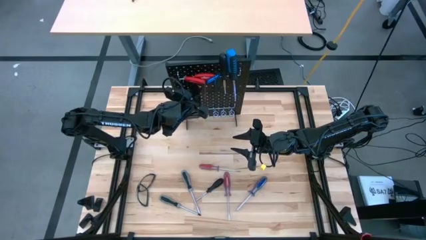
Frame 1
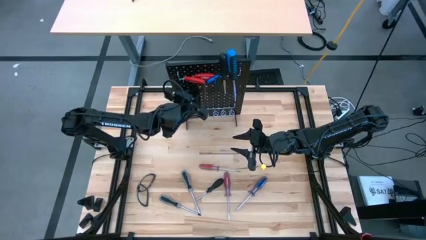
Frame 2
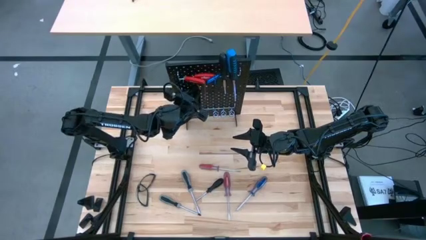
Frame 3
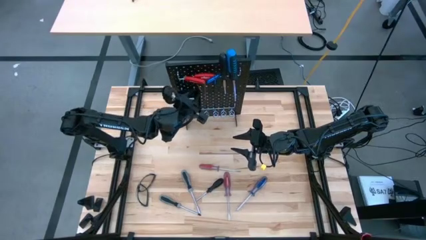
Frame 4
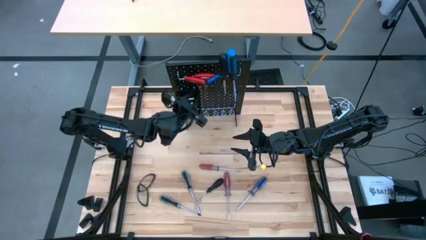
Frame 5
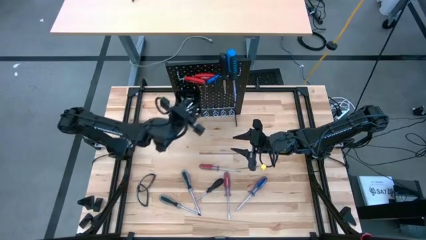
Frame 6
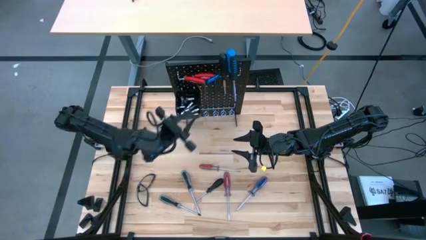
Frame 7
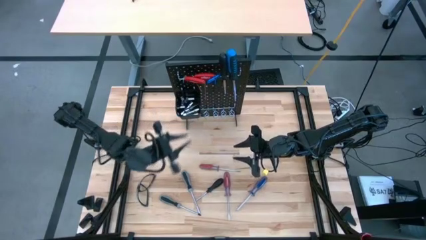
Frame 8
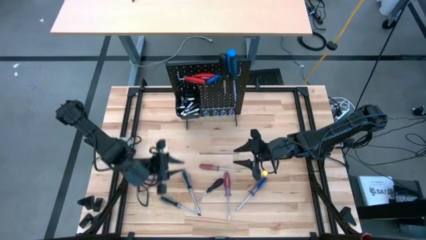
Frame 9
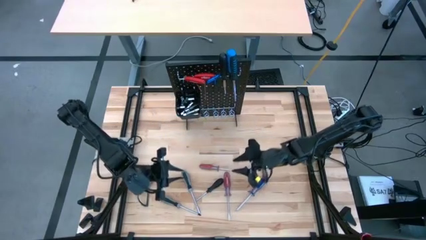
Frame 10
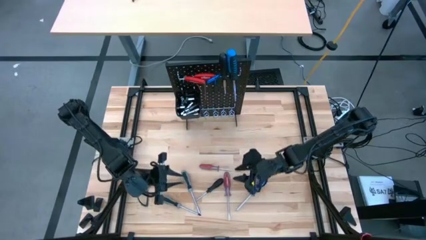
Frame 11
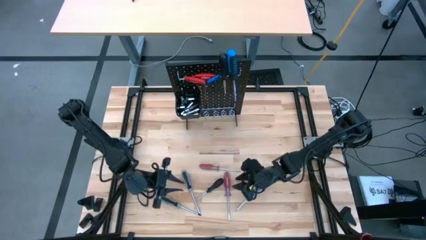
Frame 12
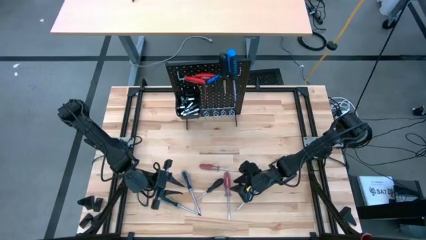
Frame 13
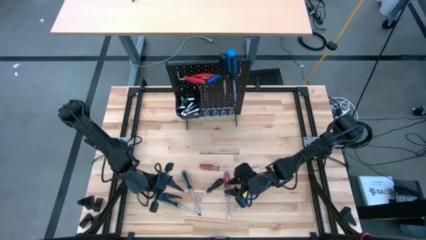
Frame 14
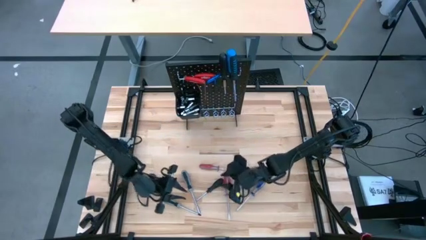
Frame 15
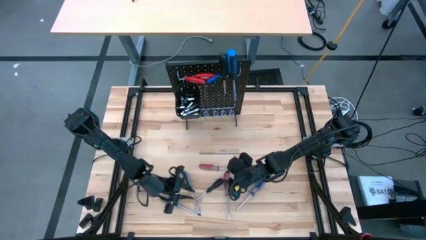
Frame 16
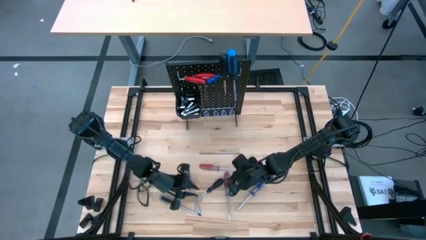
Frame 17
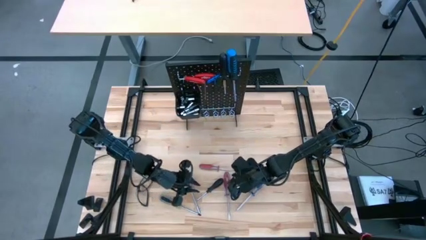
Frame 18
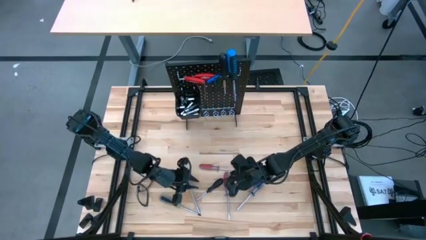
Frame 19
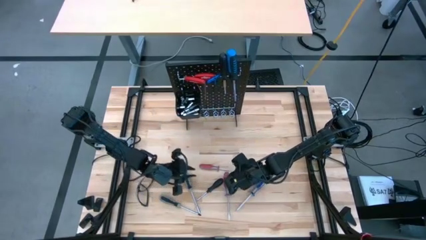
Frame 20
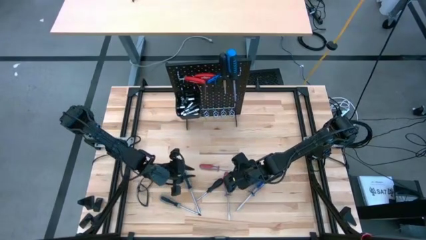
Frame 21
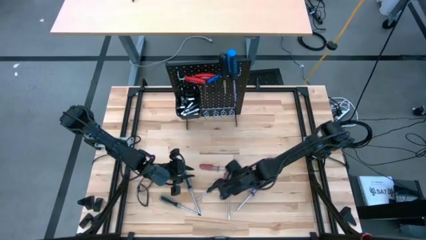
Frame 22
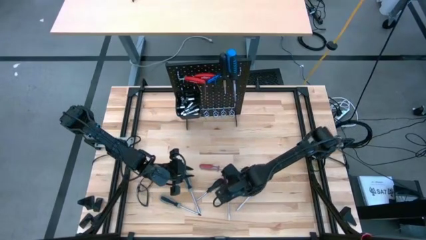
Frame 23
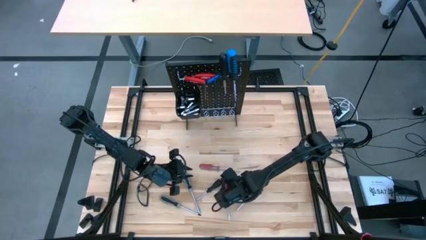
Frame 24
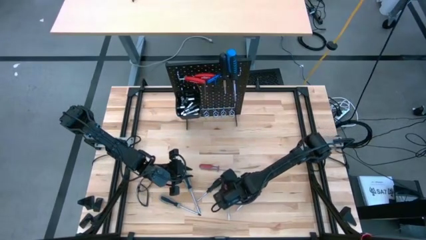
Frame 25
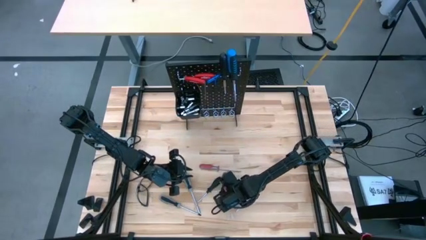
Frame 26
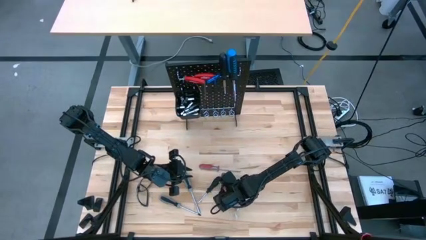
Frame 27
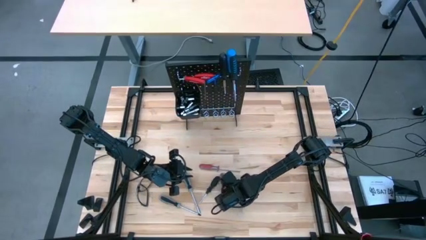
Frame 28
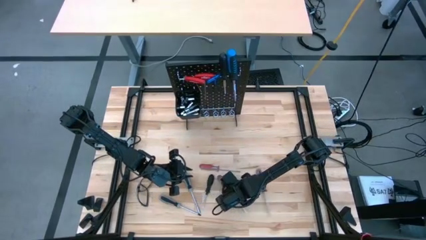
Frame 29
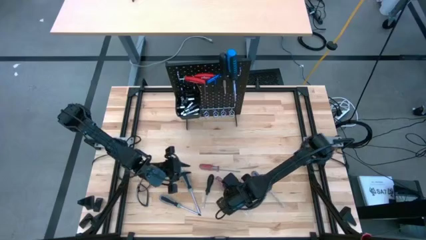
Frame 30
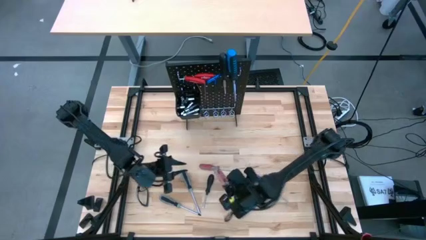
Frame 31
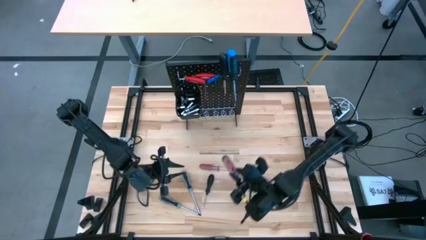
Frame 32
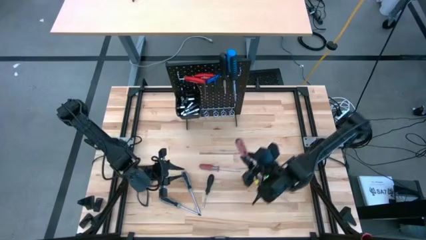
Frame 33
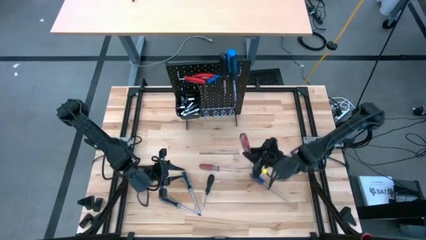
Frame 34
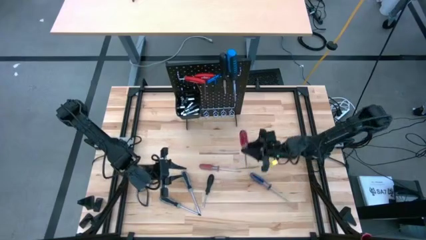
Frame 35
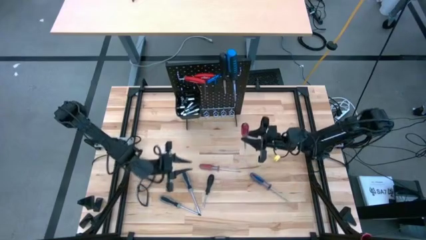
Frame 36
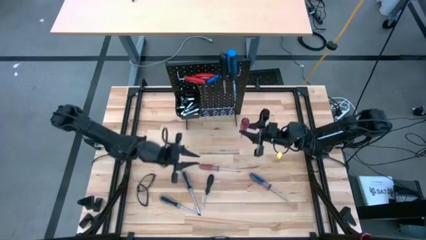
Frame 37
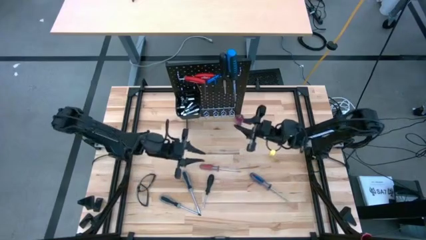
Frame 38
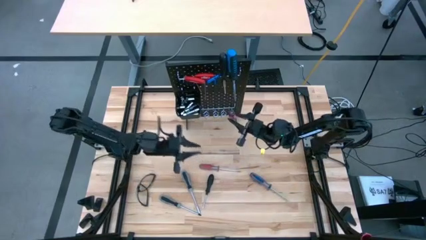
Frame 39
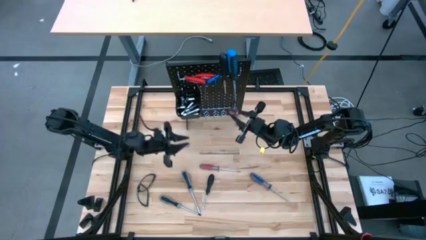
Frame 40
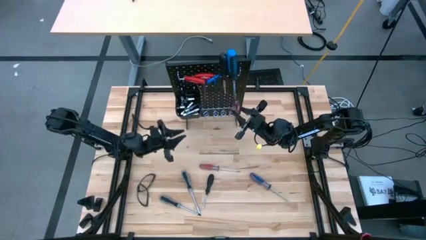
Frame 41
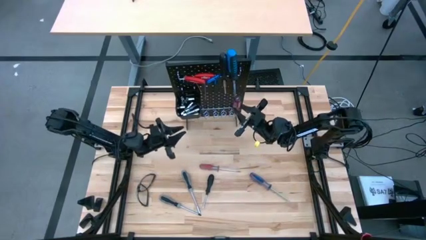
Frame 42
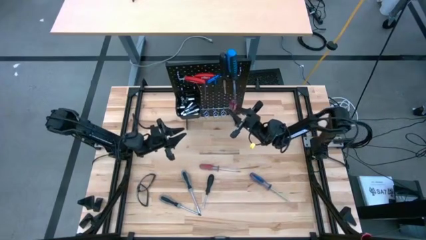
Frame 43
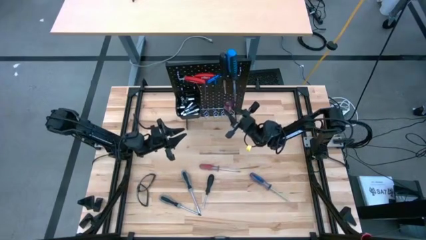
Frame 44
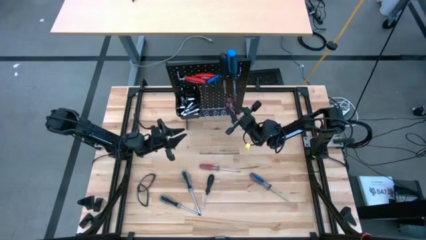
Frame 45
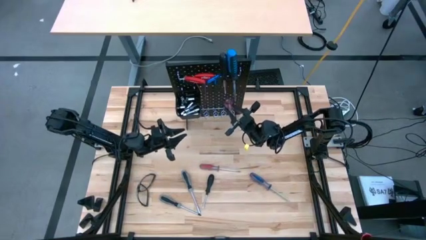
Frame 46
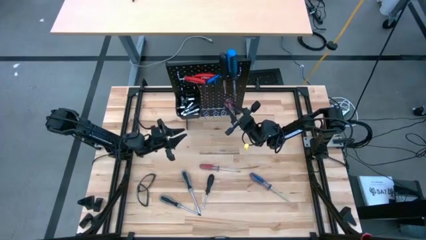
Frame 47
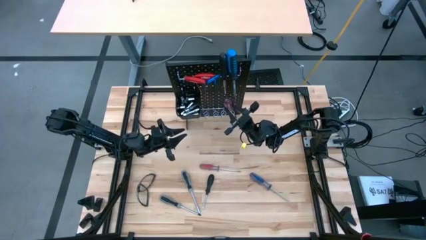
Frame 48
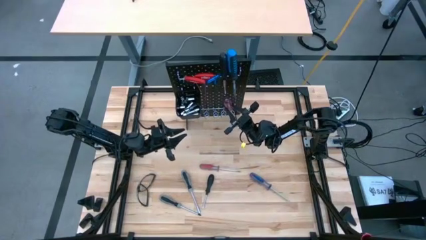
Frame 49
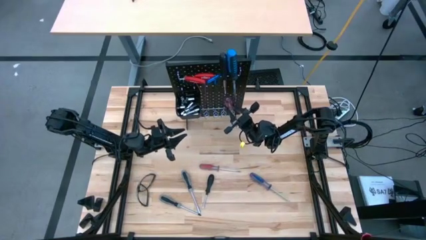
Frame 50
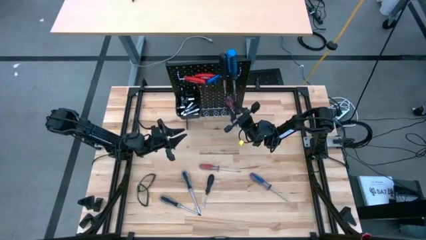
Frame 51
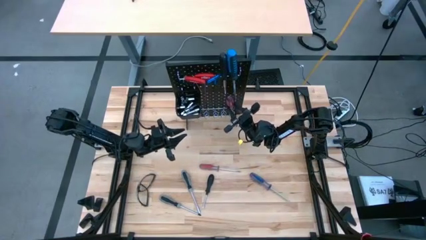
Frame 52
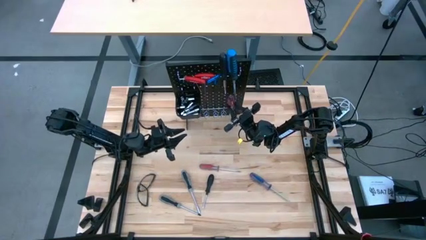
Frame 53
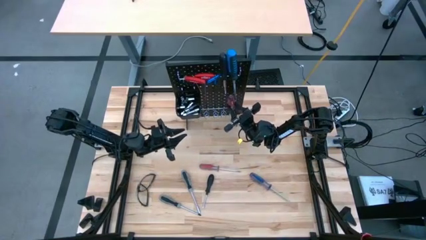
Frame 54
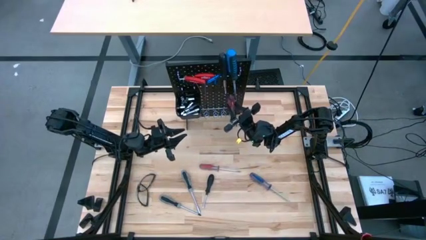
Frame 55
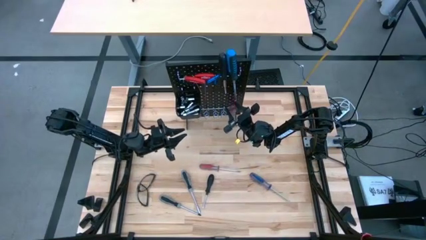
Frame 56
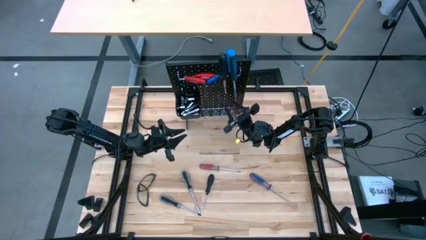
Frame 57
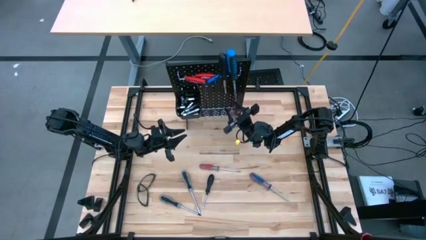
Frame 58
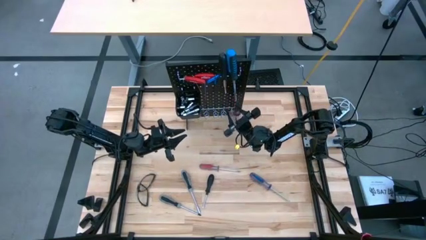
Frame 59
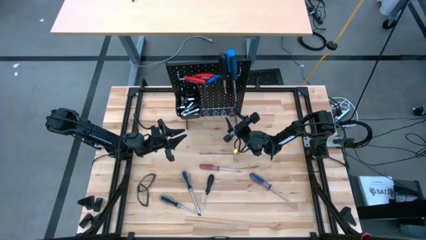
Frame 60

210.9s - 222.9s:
Task: Hang tools onto peg board
Hang the red screwdriver on the pegboard

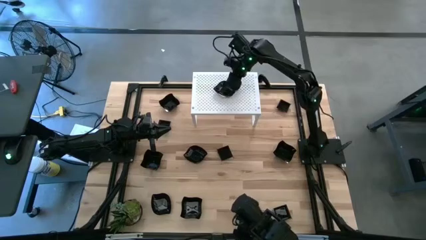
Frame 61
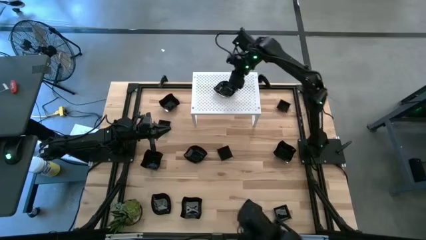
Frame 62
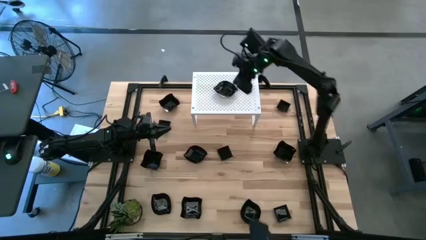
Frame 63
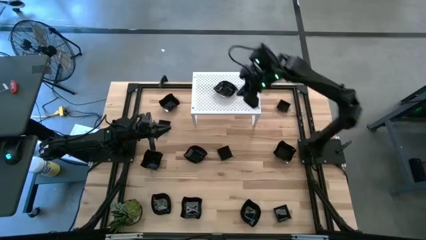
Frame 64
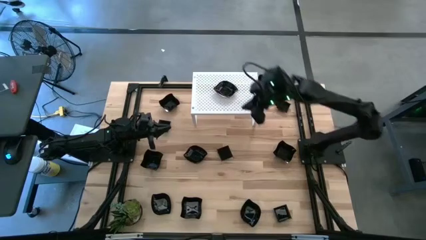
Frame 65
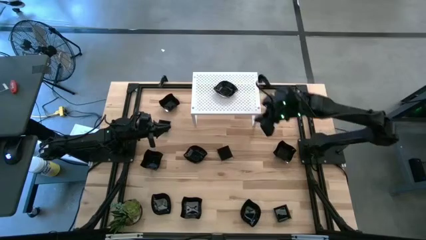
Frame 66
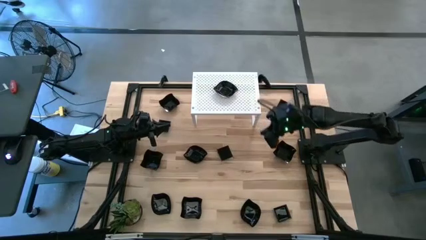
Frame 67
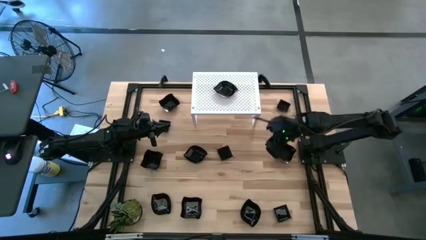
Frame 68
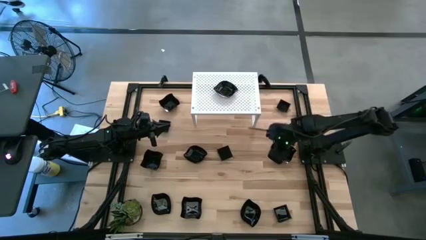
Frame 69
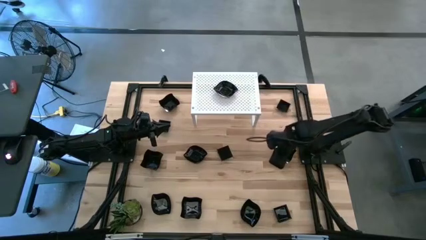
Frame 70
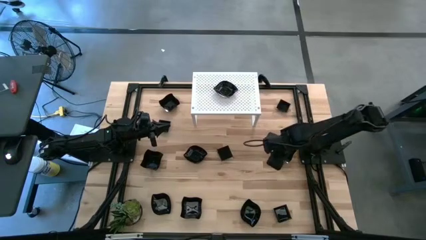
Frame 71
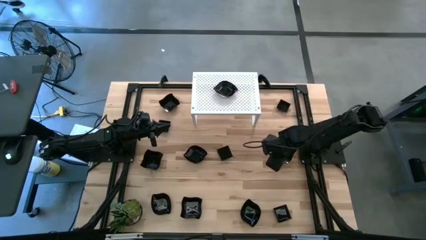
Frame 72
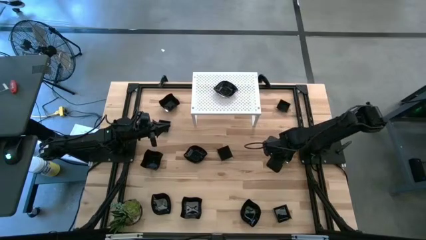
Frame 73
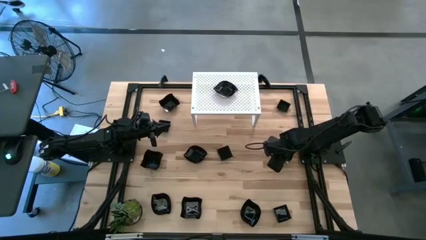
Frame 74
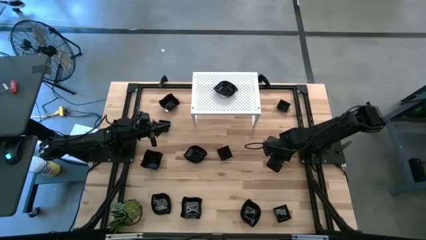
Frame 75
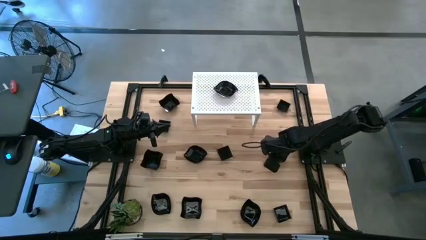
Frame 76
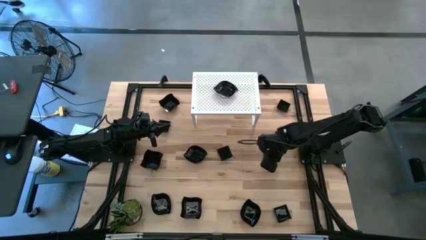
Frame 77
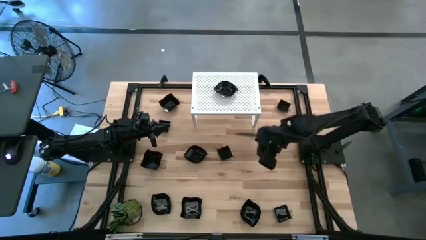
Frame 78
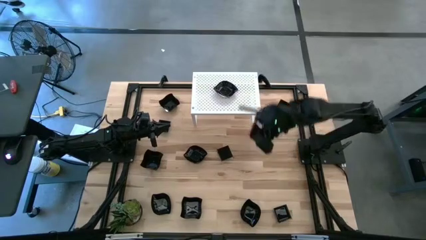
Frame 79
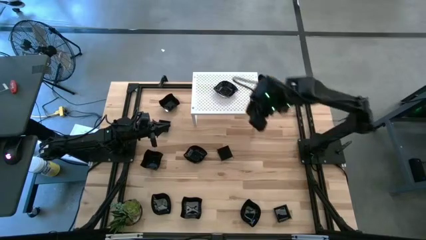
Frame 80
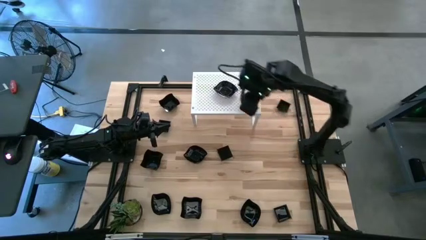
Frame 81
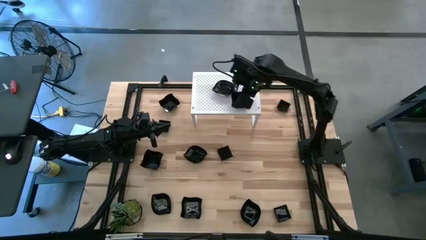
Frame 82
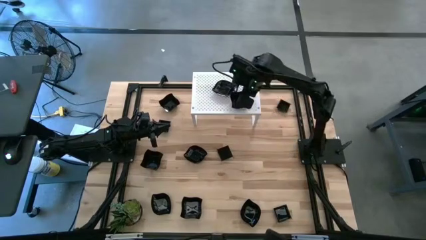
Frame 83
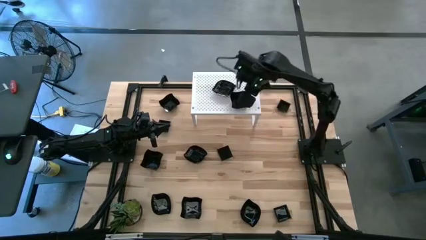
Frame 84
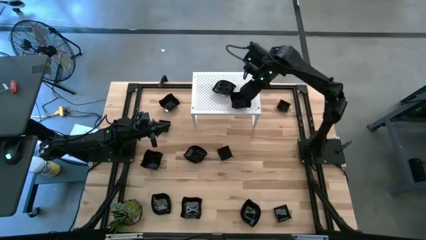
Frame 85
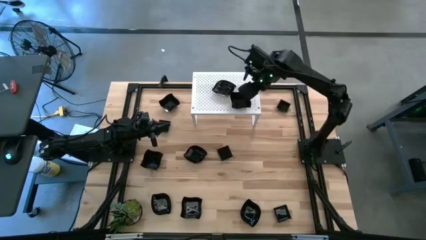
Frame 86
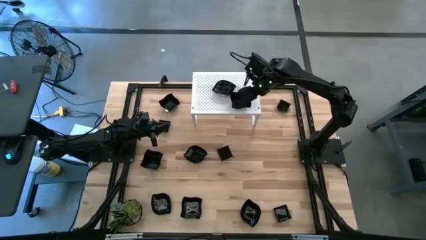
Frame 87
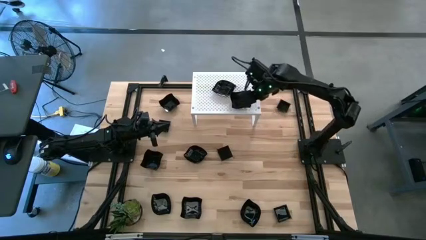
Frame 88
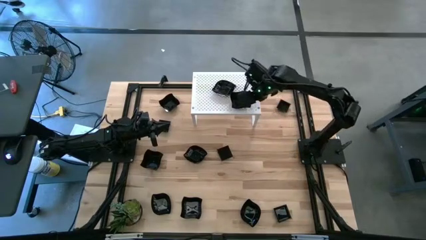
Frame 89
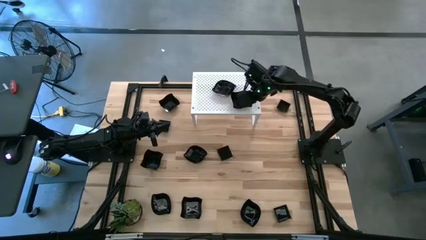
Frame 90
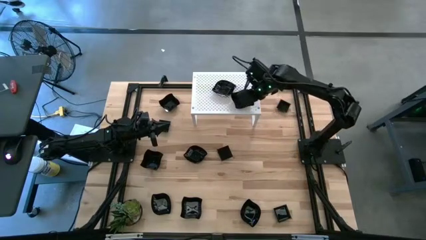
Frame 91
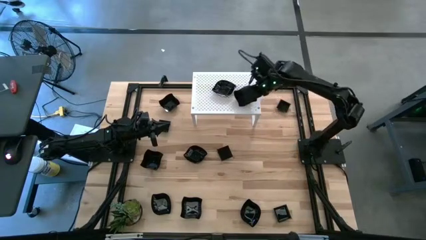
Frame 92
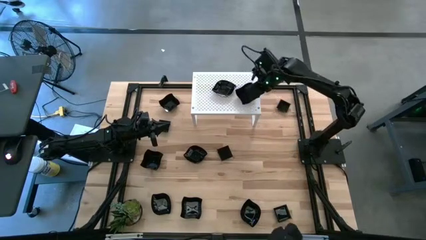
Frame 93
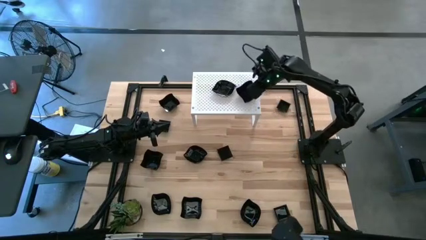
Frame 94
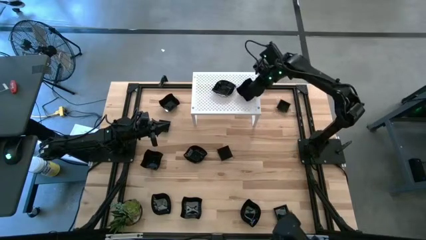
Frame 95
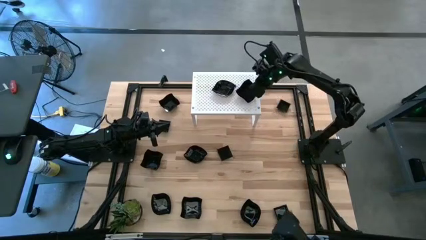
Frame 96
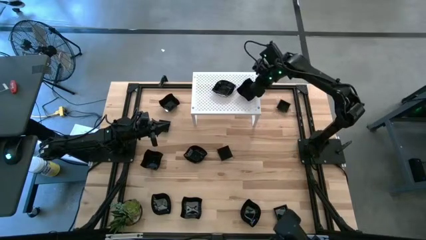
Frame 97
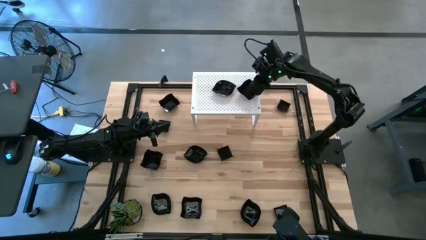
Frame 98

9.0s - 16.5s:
Task: Pick & Place Mini shaped plates
Put the black distorted square plate on the shelf
